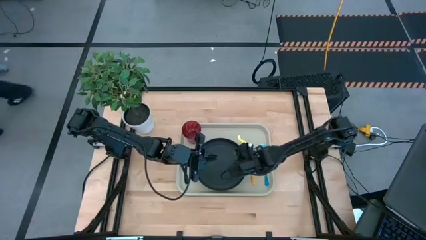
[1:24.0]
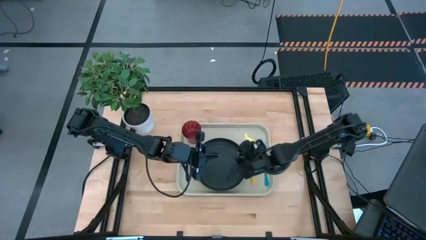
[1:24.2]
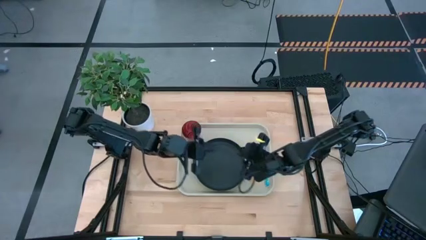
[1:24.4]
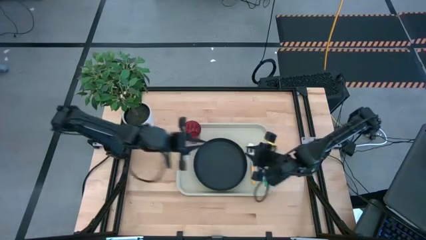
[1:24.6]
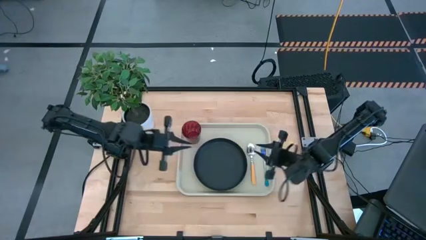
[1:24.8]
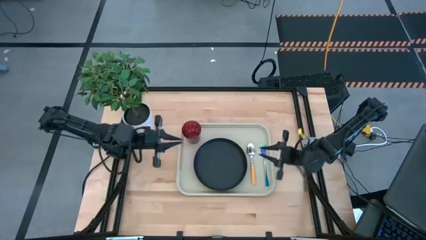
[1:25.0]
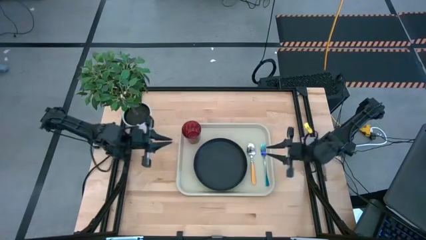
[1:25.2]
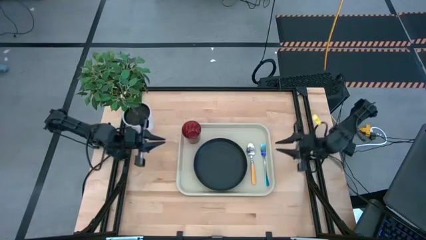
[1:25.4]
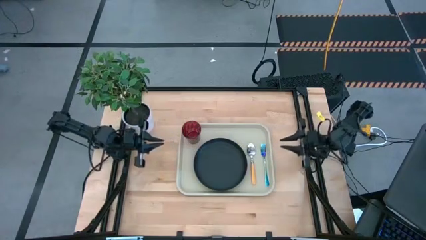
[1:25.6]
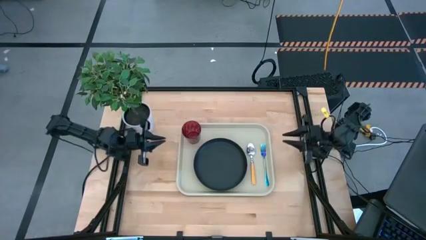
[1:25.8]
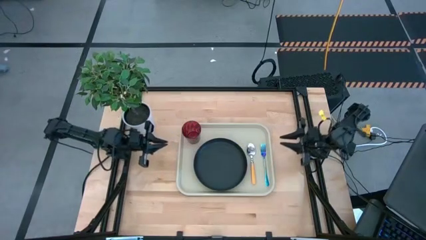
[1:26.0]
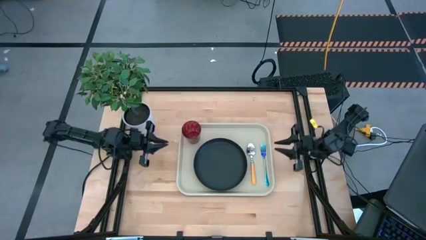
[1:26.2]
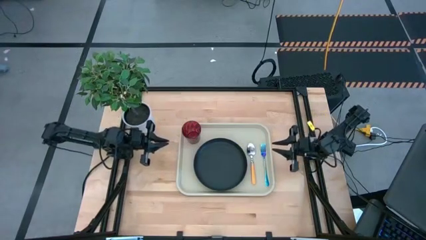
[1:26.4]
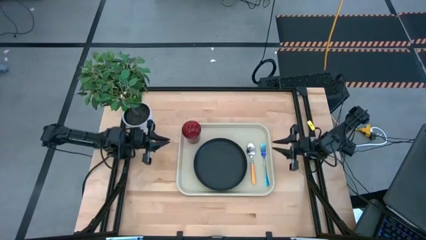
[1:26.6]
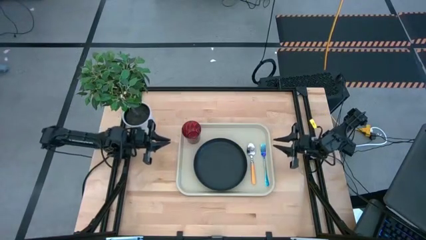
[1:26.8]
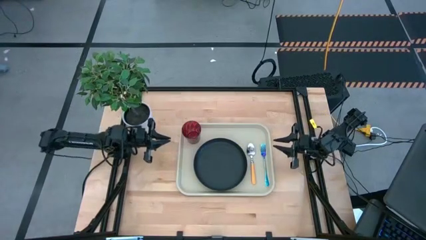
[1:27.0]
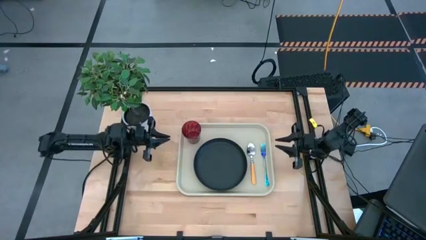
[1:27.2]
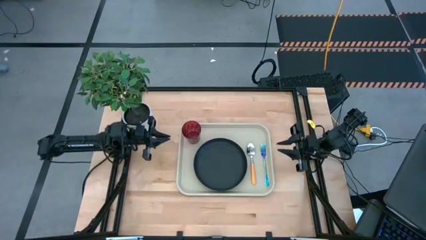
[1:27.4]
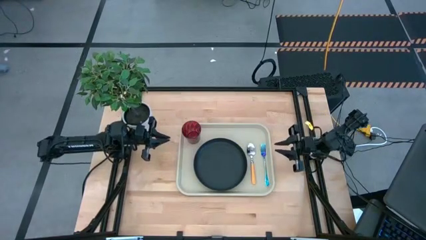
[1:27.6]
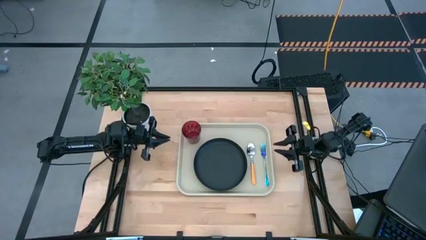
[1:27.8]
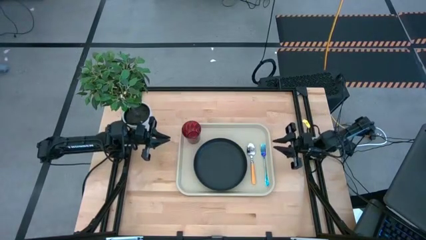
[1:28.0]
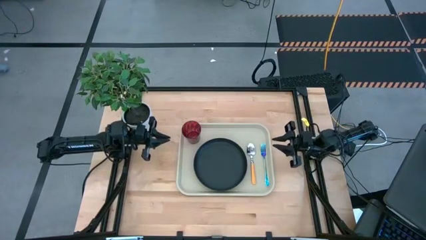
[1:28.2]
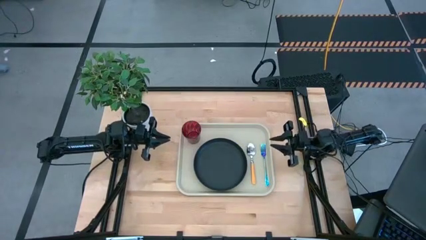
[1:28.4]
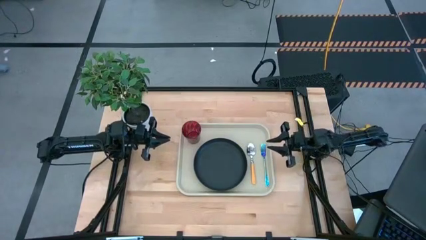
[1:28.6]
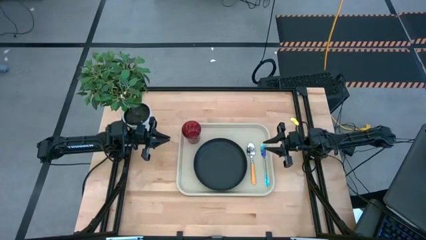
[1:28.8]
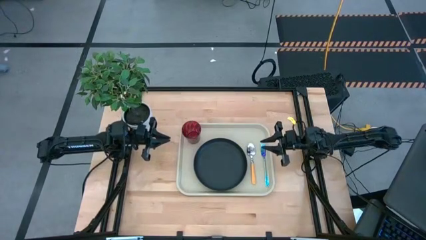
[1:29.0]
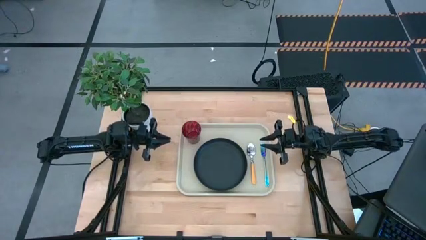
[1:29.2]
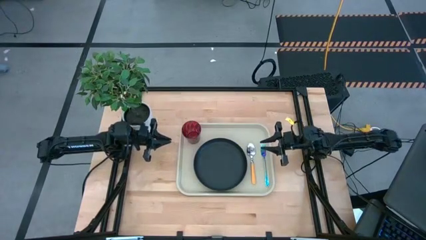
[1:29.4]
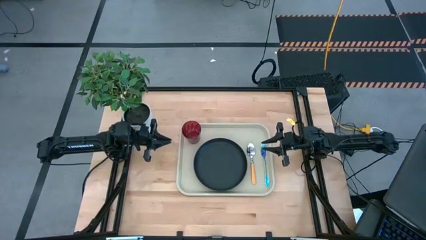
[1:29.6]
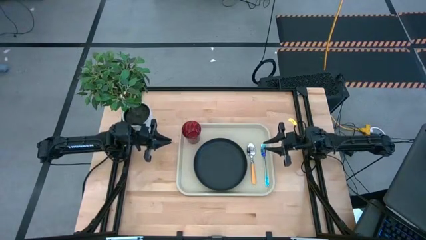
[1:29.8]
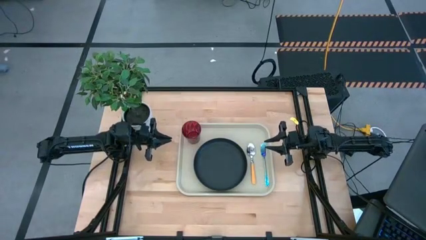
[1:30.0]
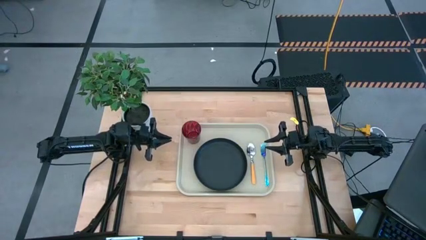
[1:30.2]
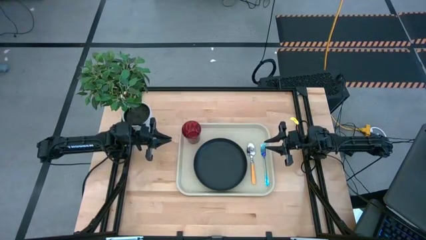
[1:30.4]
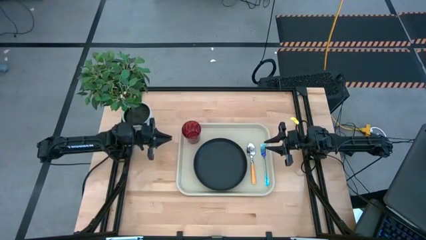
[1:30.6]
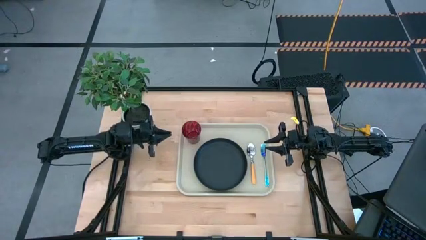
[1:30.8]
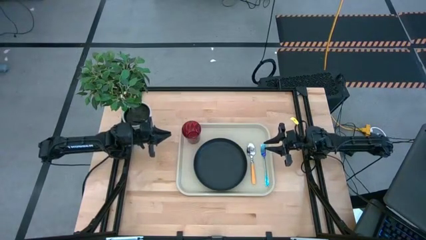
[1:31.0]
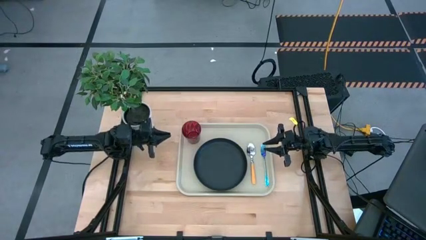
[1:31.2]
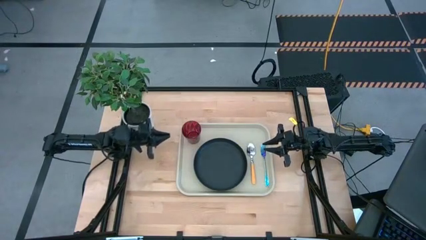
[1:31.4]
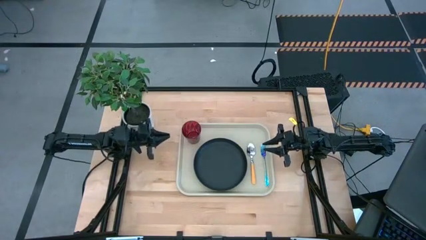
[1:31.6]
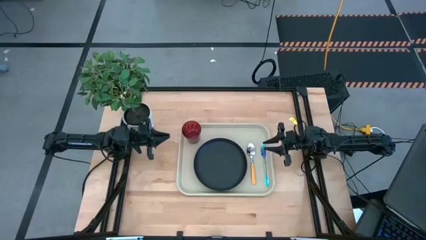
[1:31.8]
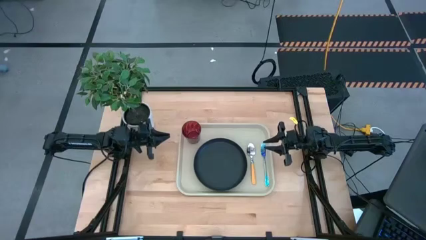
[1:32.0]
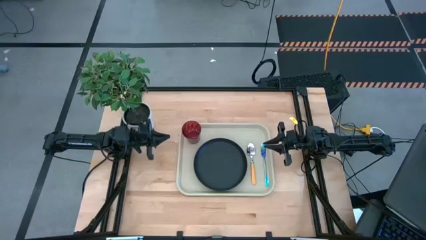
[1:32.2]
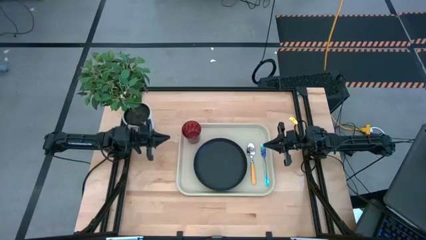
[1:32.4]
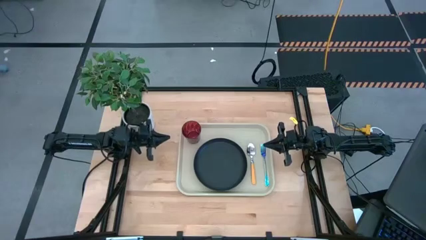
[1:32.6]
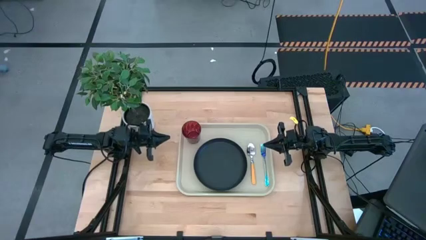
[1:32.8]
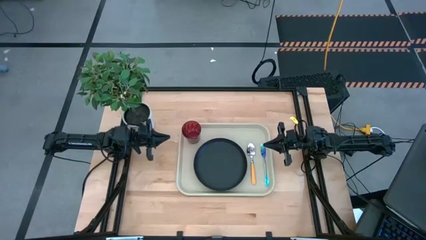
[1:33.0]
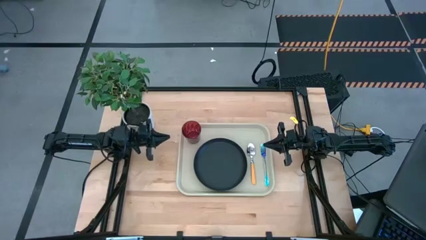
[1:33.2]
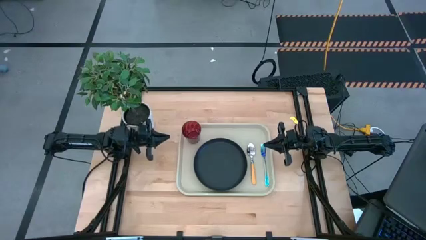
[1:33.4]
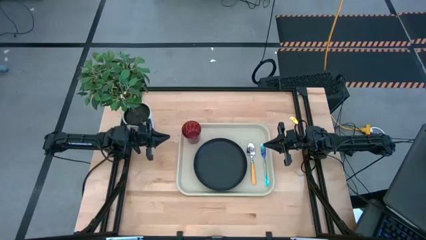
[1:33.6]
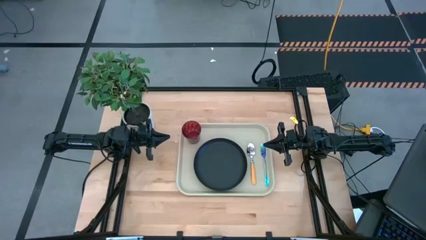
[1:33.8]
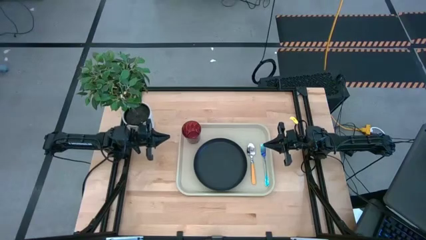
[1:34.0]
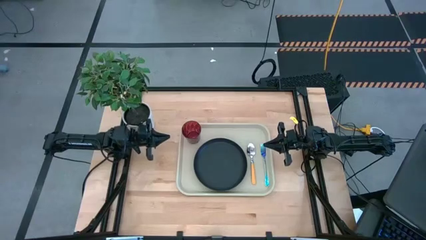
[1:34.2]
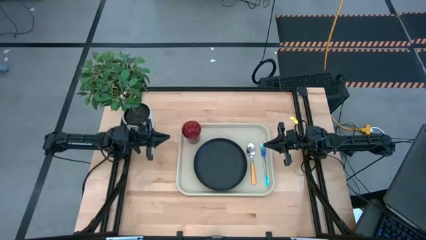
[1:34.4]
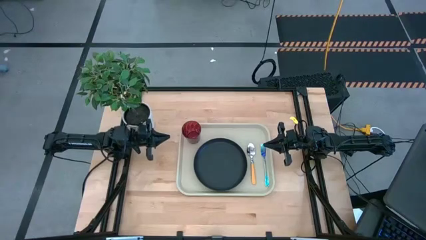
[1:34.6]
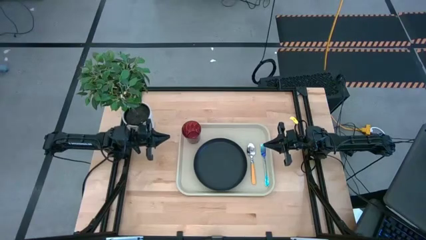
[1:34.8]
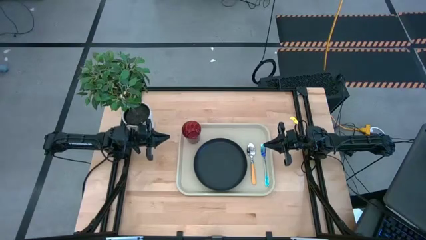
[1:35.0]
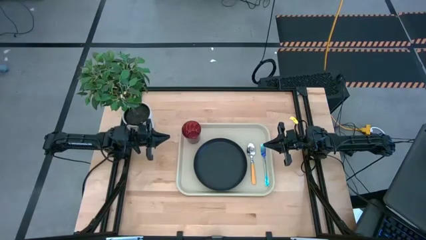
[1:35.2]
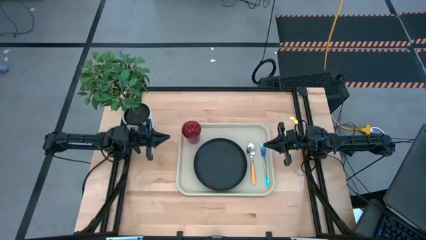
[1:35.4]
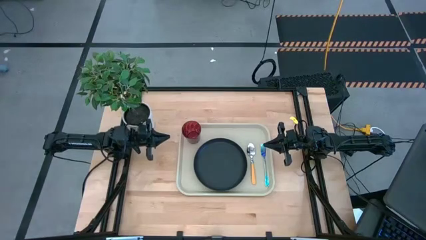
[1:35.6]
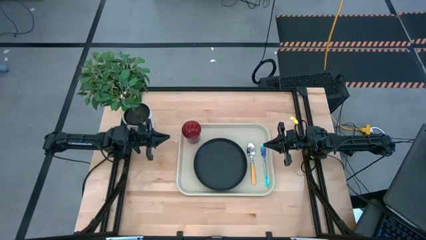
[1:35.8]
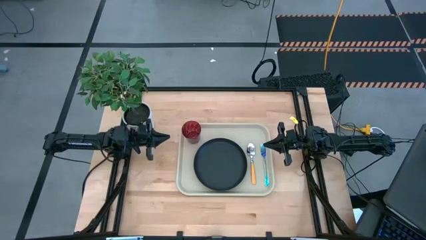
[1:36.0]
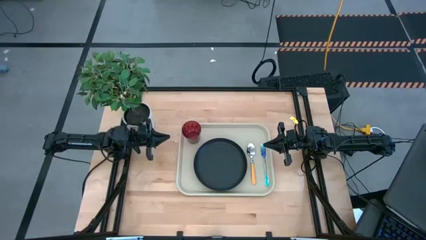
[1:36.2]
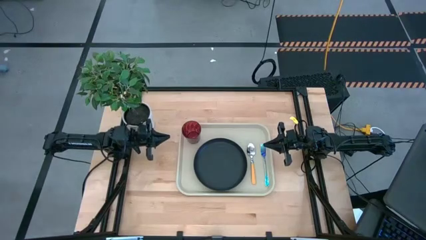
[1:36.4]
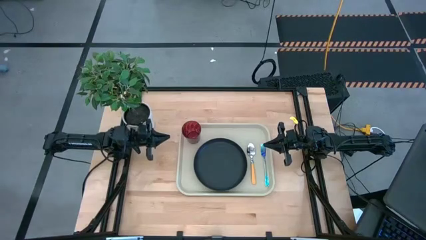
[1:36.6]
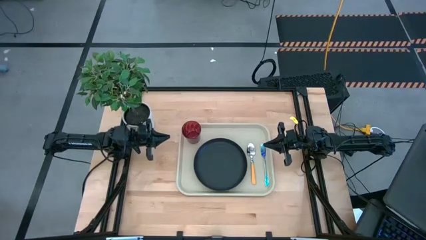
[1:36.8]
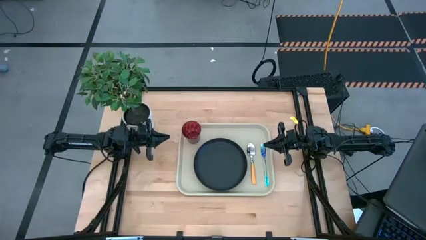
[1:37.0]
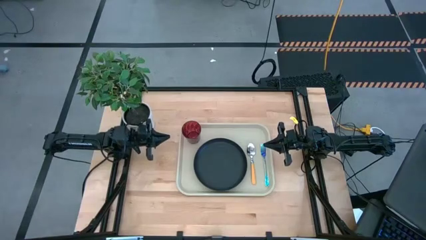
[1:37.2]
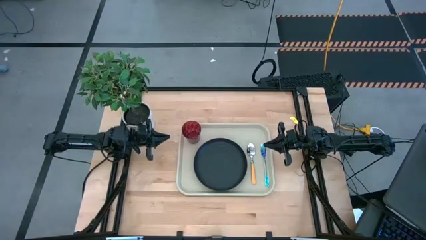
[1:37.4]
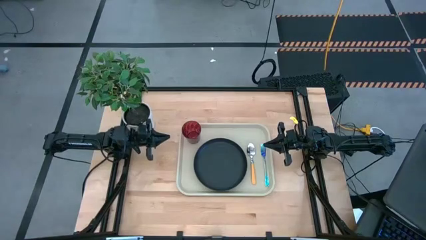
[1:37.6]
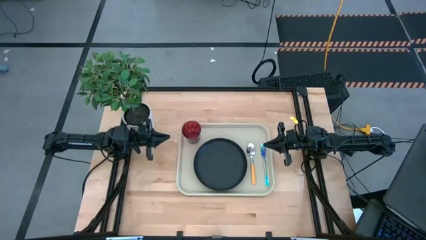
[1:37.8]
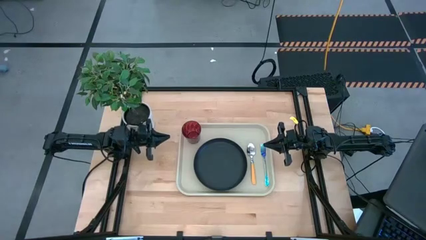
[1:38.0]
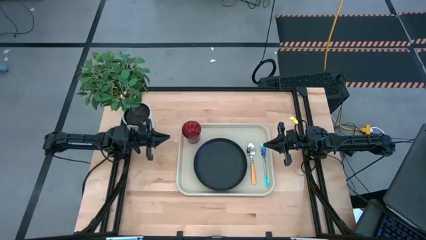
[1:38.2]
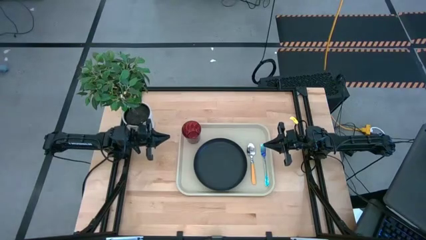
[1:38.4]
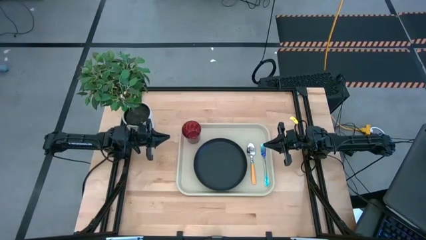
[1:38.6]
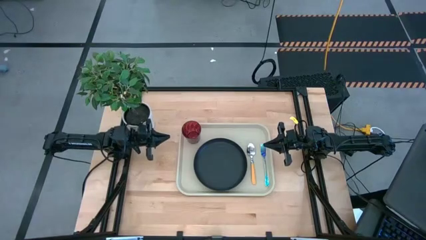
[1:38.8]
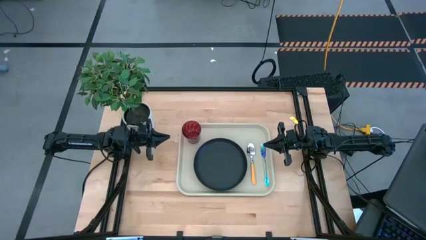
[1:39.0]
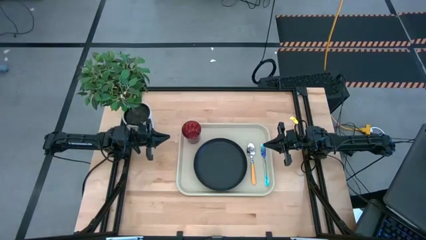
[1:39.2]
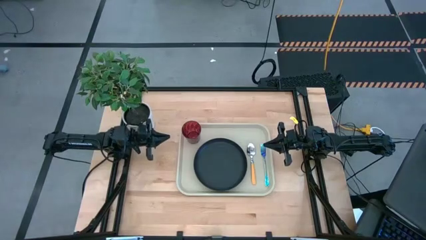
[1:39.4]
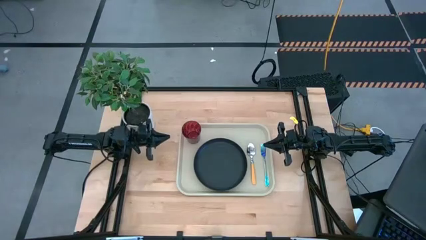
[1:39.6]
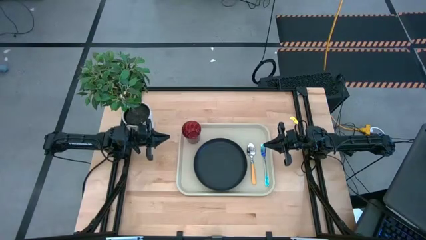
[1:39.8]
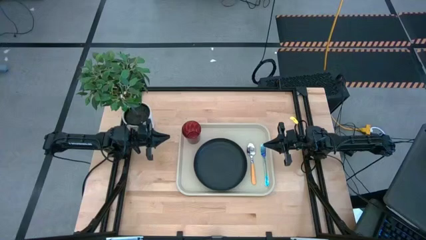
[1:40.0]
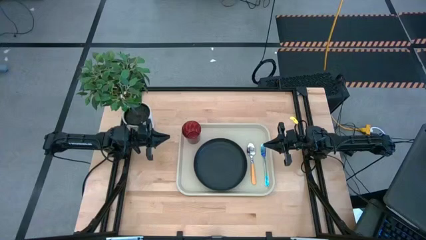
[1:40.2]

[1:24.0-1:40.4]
Task: Pick and place plate/cup/fork/spoon on tray
Return to Home Position
